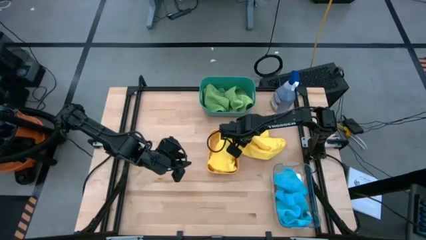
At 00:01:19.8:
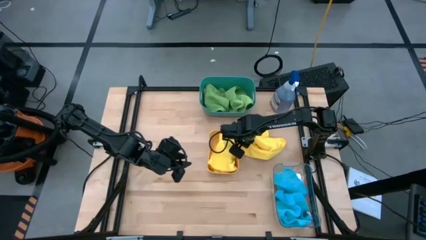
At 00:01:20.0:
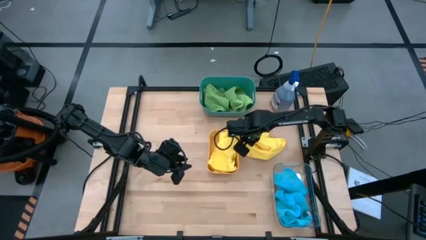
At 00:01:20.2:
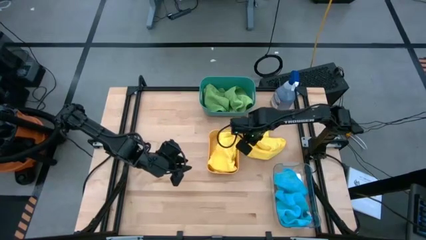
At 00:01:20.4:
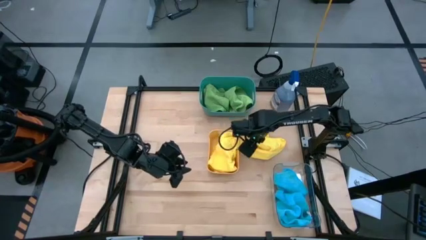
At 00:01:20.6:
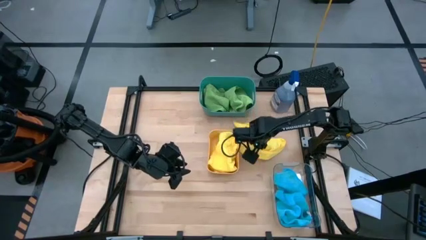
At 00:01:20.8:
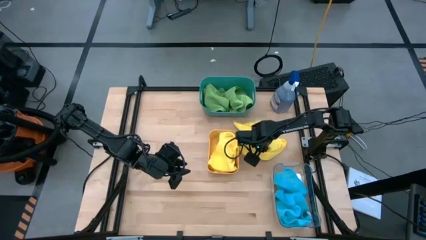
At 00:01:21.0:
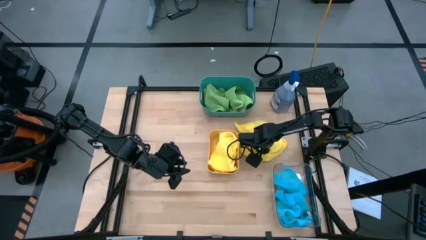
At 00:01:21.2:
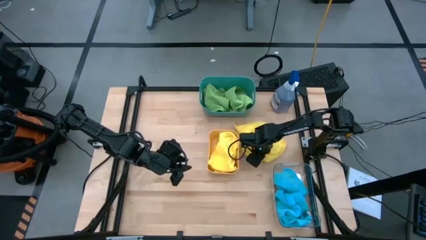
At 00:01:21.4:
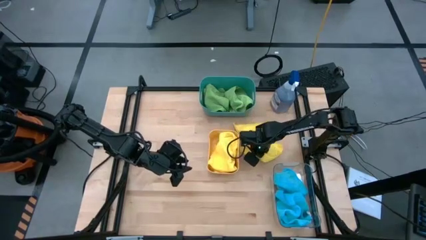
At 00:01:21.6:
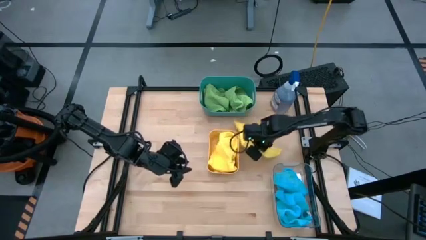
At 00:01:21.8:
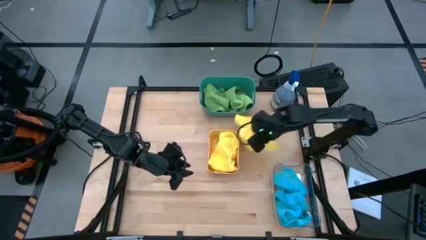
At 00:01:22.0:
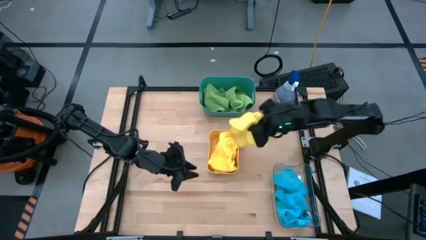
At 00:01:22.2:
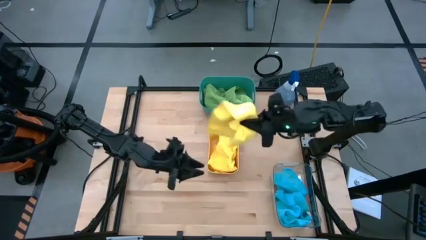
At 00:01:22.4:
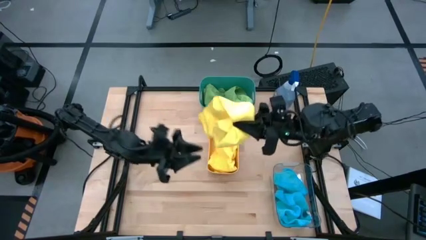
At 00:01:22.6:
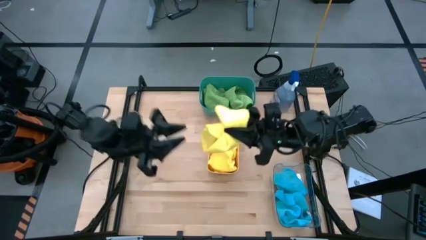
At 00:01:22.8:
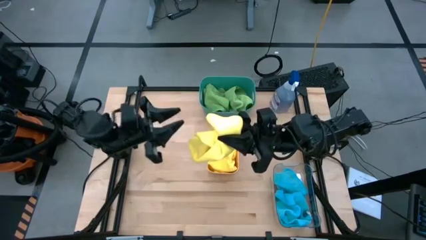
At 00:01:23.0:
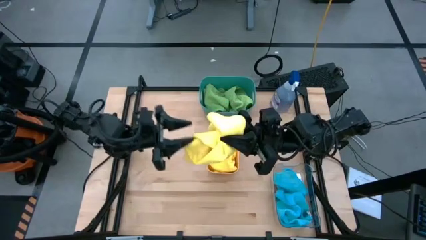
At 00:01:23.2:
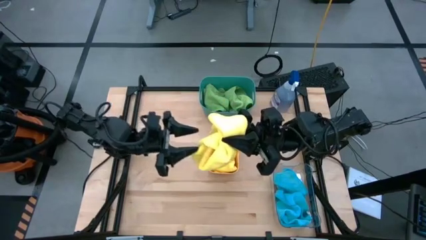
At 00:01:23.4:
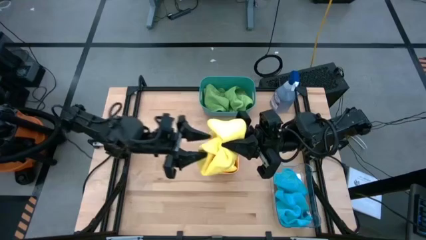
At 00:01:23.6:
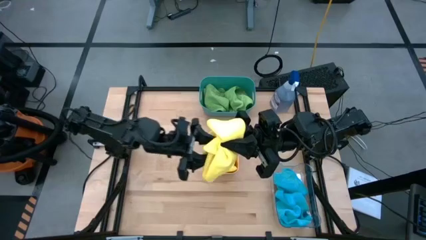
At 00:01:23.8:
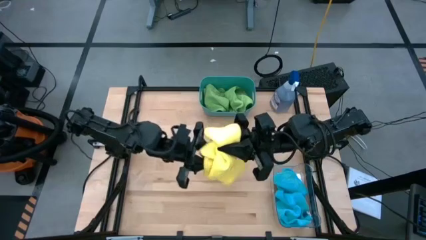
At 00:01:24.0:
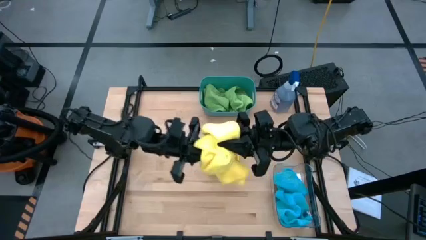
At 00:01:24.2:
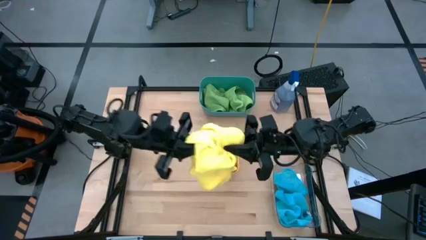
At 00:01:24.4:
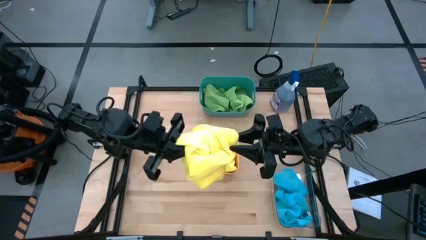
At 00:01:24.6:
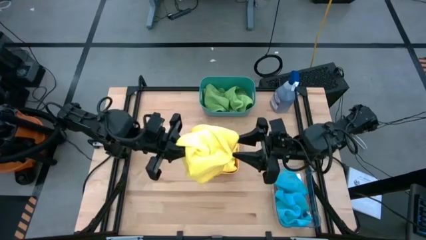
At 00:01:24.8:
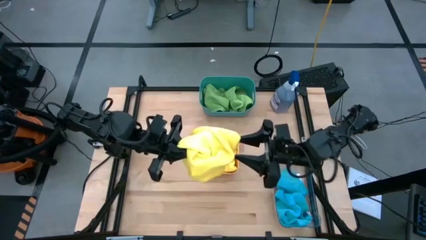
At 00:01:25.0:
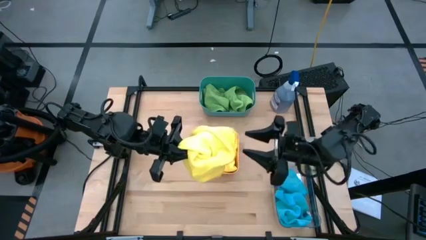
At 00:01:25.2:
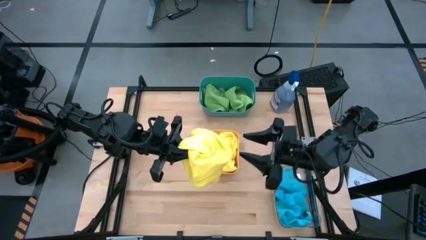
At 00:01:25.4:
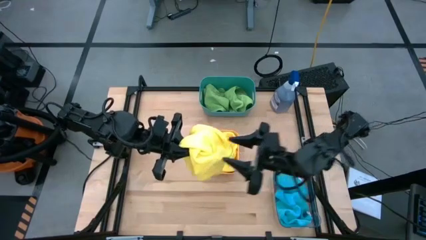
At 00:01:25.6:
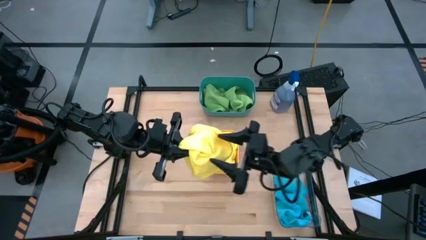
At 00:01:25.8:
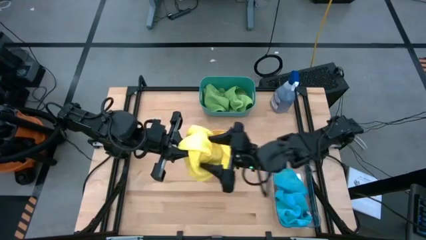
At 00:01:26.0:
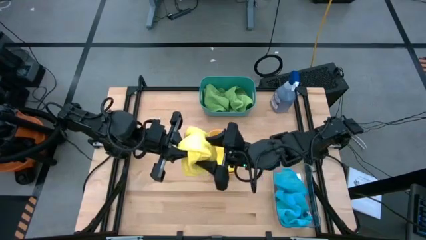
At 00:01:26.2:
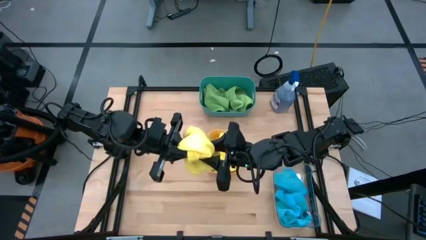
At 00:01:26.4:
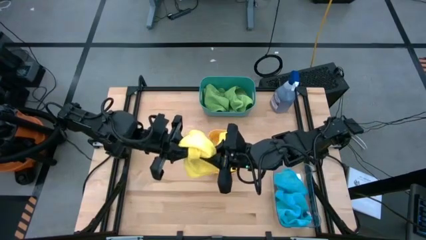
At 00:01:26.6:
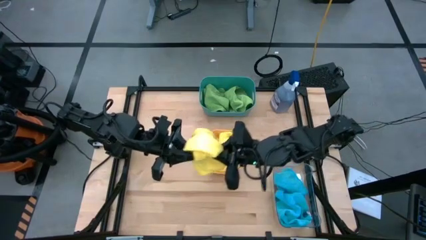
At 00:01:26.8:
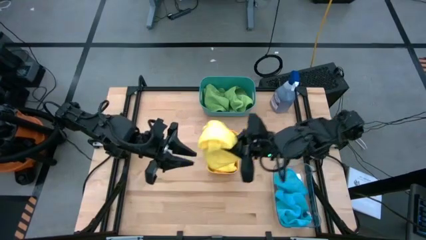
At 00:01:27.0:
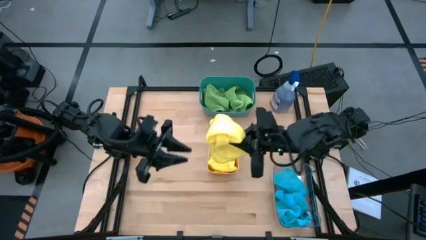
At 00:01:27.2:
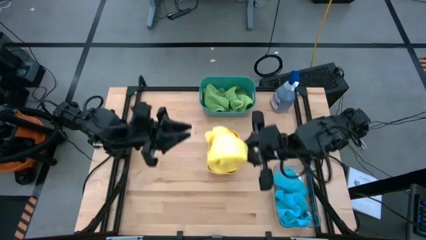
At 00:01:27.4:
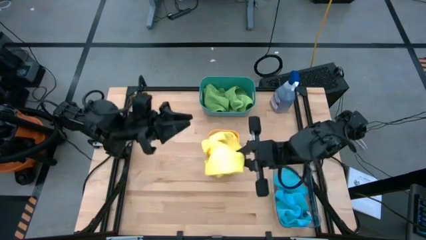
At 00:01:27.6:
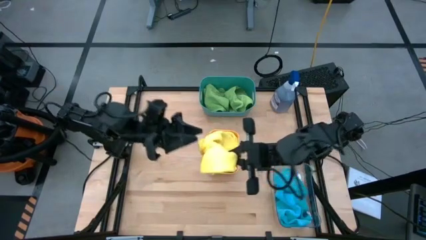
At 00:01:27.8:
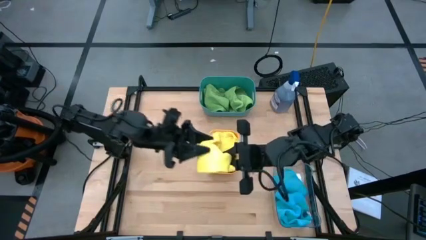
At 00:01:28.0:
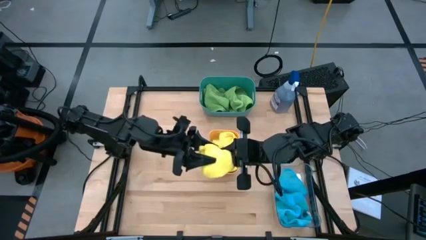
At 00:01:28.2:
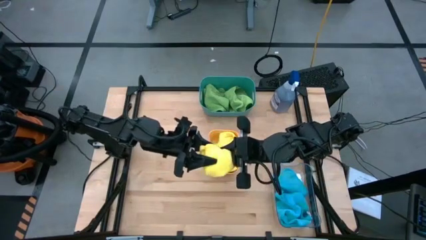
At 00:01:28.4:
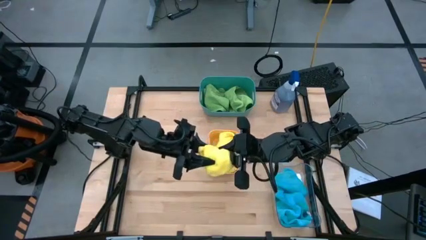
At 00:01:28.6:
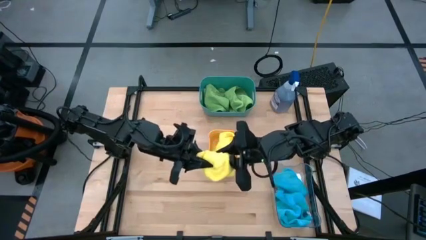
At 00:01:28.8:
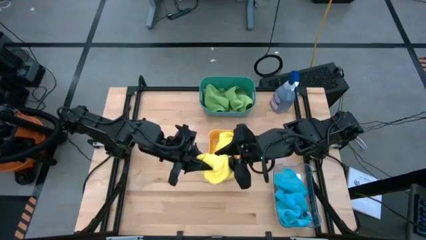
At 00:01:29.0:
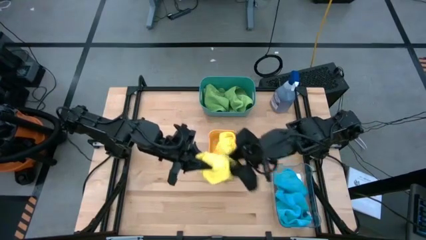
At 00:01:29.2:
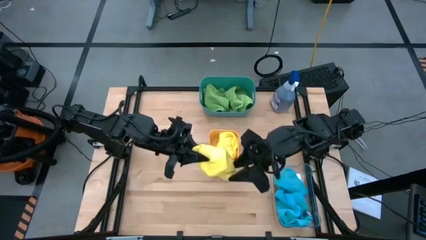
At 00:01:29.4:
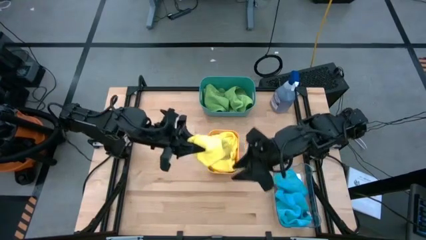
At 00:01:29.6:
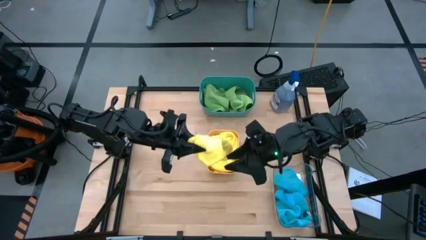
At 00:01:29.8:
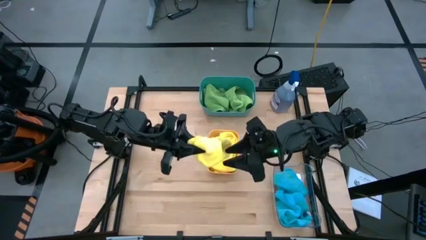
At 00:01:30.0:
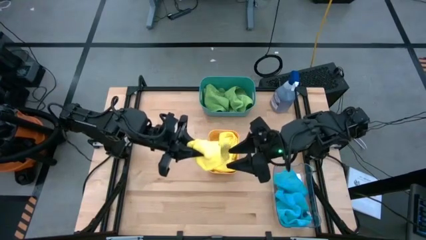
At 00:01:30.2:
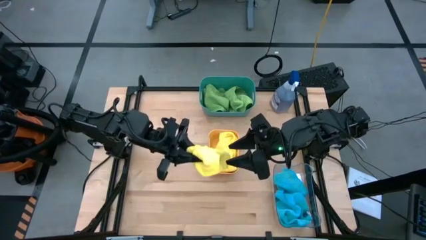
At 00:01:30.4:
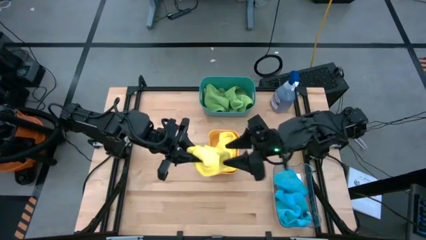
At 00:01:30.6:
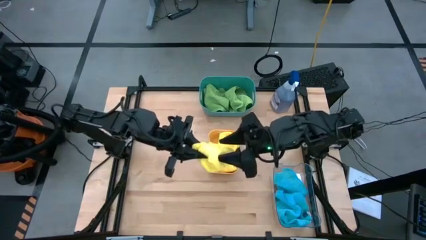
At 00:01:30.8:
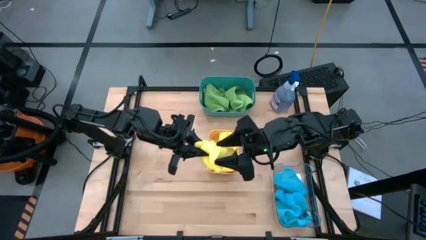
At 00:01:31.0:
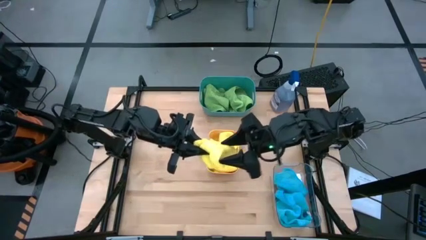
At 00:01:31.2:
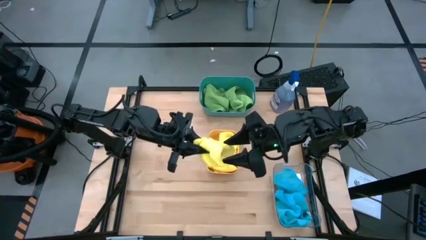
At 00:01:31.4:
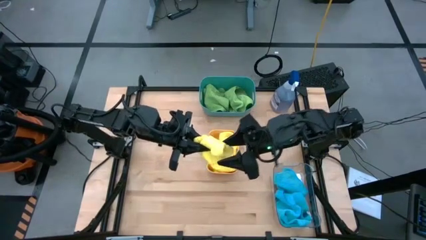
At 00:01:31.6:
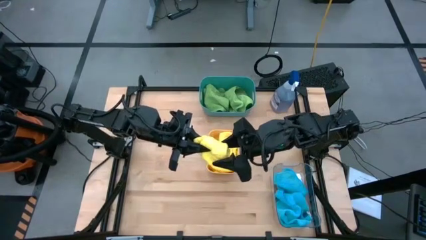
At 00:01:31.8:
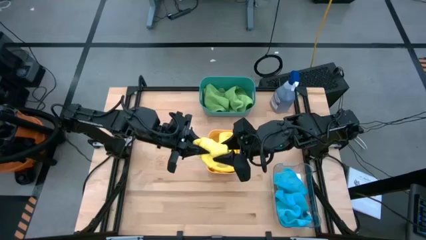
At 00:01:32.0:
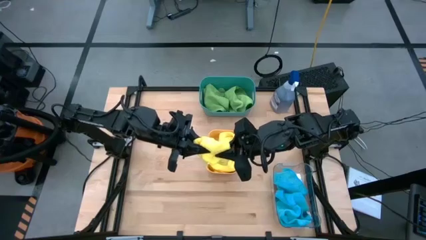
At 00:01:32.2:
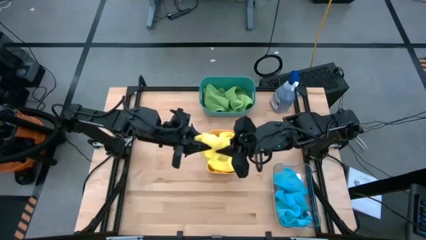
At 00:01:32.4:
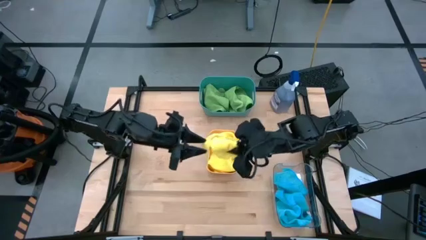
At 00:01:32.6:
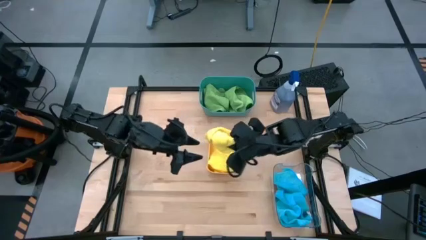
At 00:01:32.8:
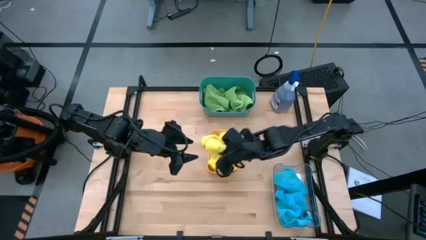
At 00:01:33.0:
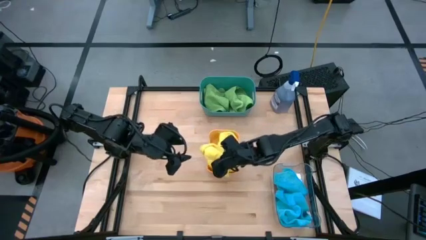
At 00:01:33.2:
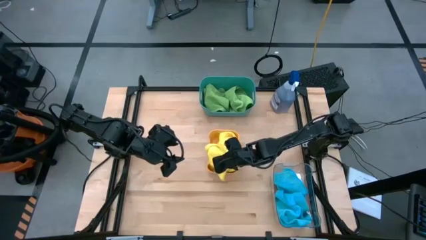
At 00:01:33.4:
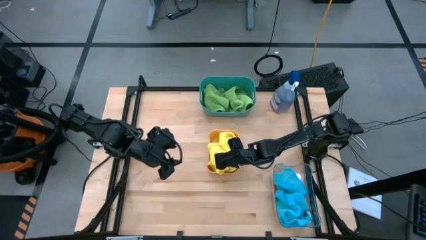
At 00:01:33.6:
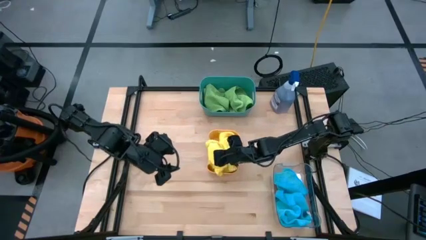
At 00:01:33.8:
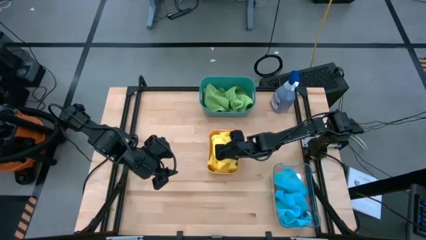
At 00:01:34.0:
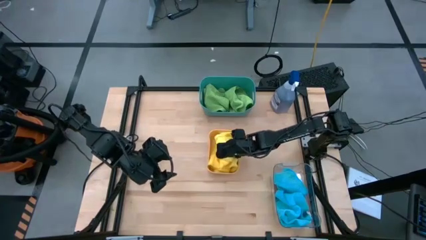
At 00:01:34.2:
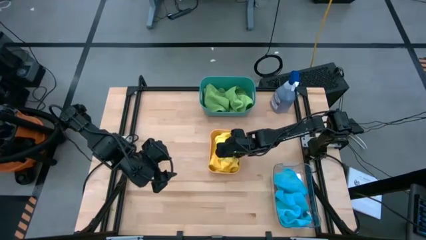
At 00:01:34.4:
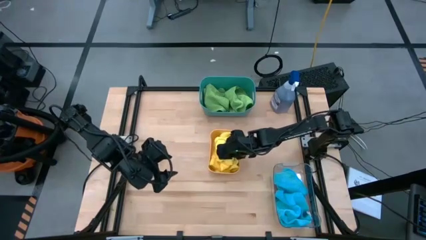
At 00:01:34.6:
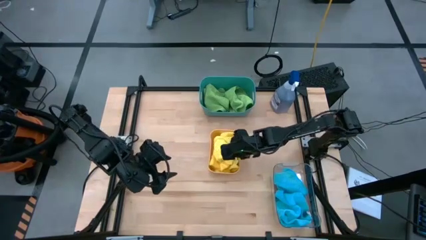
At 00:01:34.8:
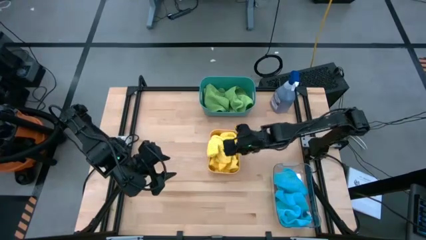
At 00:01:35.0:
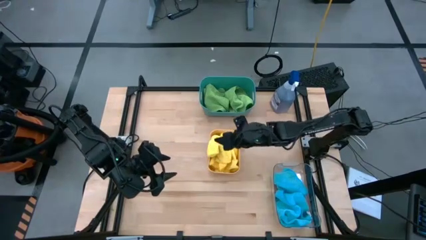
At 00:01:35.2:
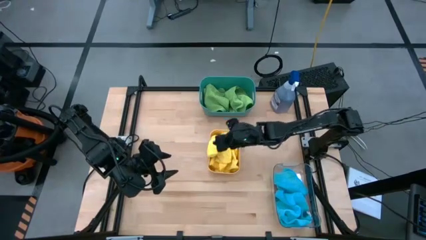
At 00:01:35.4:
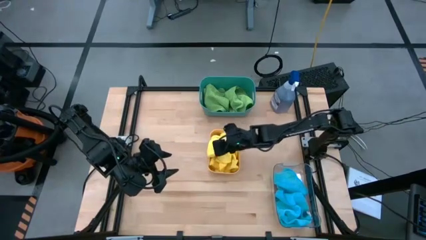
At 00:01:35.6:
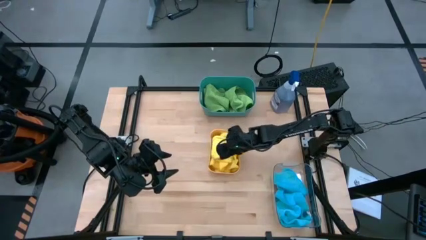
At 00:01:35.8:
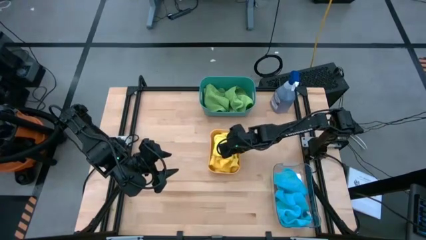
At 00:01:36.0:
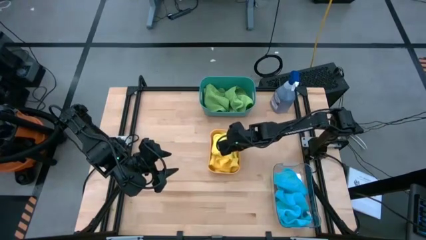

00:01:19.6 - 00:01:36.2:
Task: Sort microfiber towel by color & place in baskets
Put the yellow microfiber towel into the yellow bin
